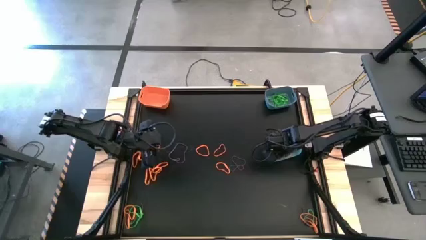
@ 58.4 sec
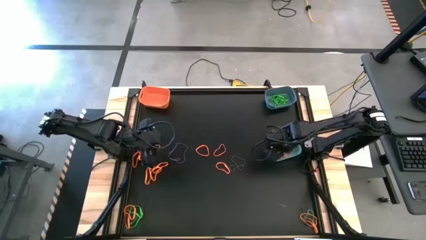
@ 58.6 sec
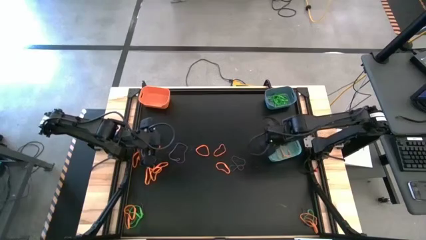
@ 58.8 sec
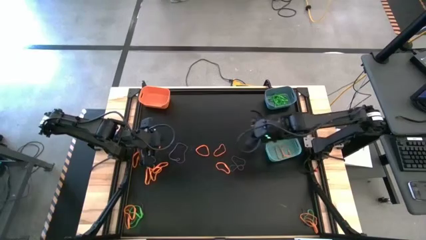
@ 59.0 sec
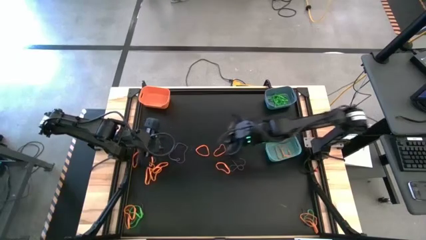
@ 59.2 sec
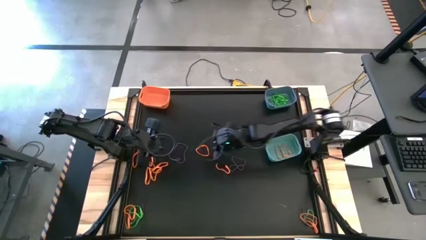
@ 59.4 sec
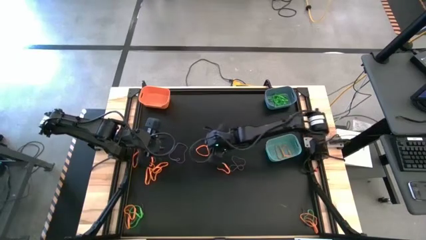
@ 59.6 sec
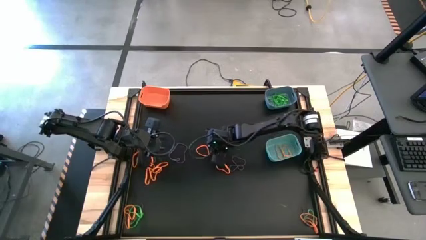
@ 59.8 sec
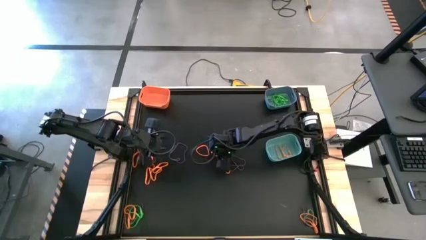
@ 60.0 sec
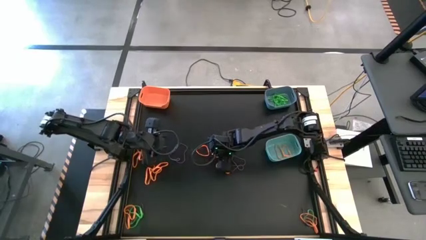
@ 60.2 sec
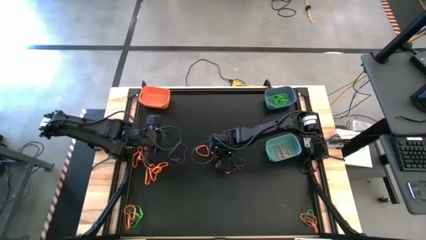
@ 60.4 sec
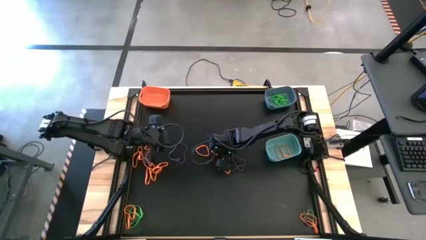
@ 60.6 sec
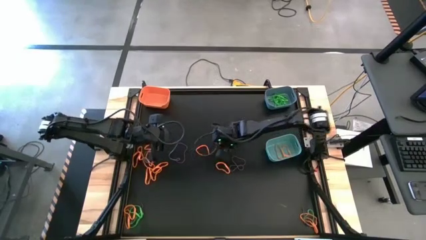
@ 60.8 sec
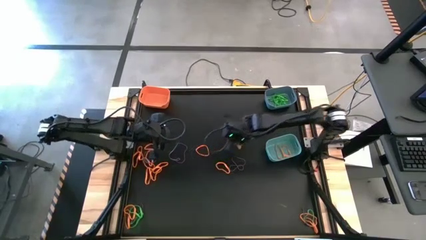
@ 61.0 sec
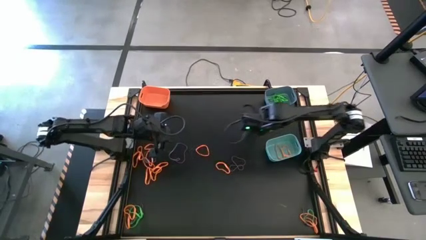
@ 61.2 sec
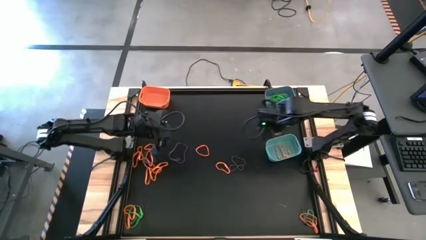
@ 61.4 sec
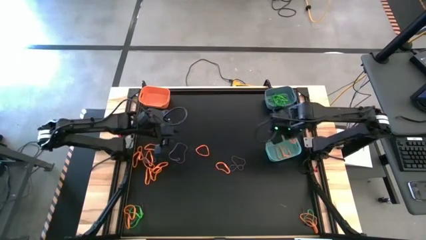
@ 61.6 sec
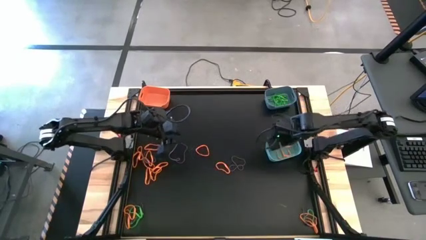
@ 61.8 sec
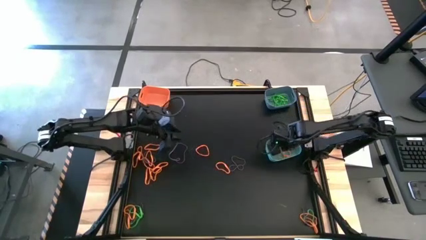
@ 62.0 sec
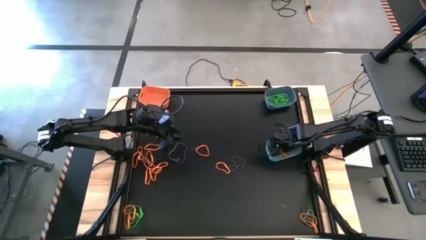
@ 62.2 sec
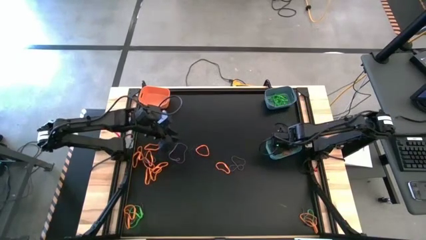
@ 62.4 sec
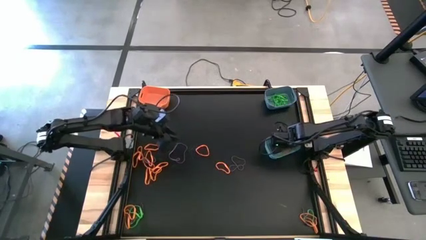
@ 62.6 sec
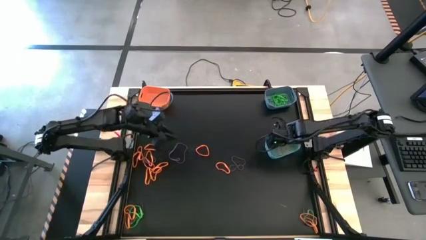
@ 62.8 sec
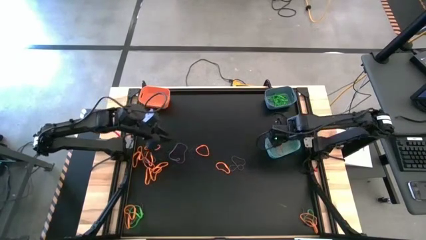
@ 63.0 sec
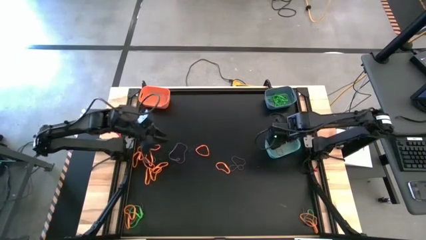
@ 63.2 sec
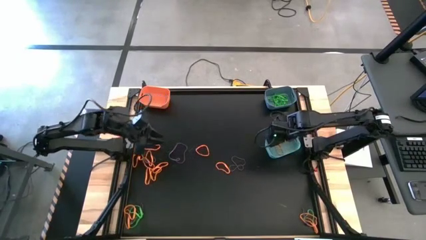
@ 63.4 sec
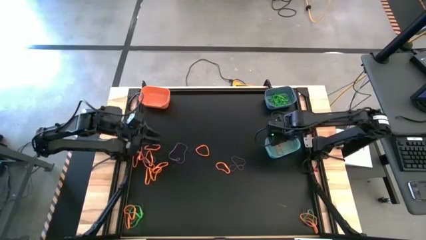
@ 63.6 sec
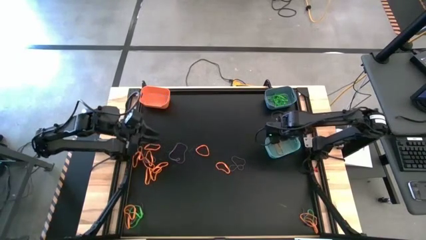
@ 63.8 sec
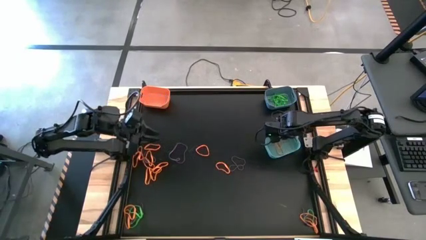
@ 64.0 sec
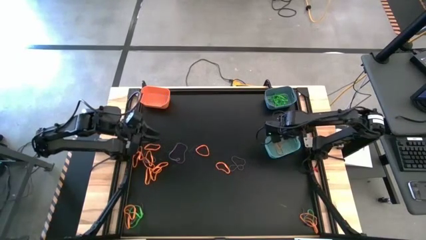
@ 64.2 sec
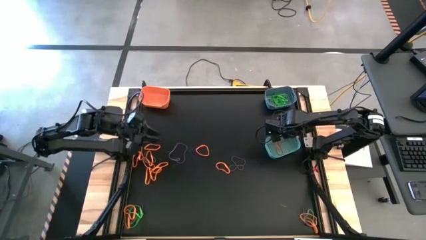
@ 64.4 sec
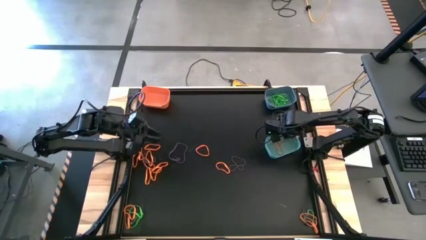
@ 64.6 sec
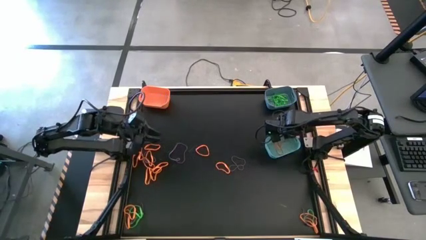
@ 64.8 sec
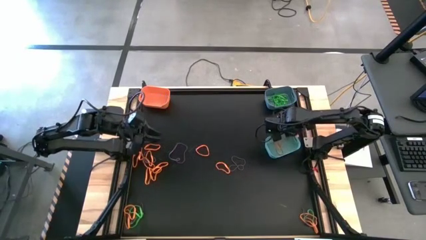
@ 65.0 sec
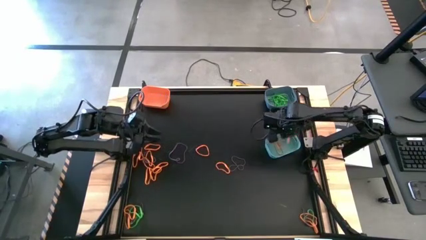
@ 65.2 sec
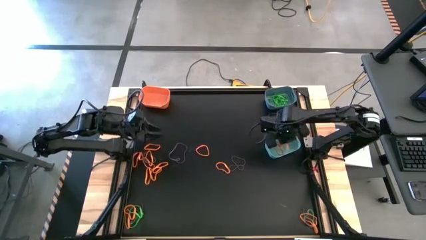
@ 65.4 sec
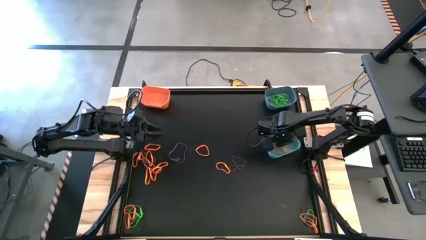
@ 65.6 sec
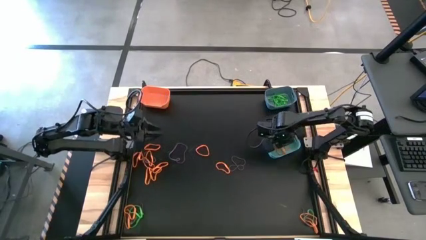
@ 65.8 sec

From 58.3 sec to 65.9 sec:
Task: Sort rubber bands into baskets
Put the orange rubber band into the green bin

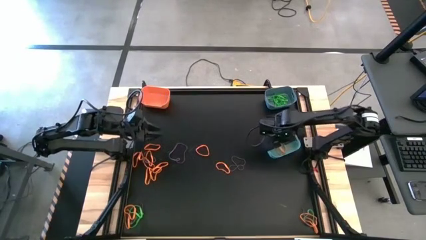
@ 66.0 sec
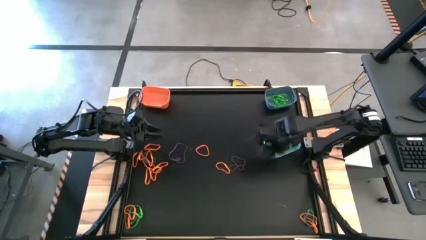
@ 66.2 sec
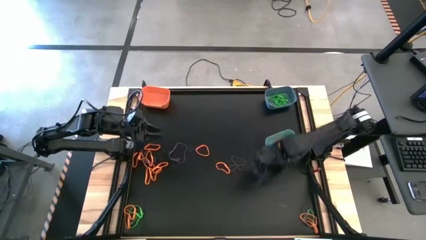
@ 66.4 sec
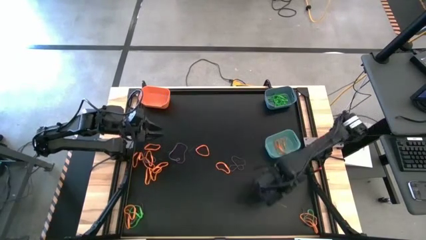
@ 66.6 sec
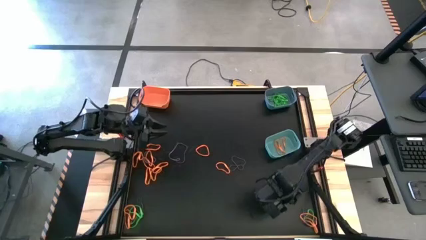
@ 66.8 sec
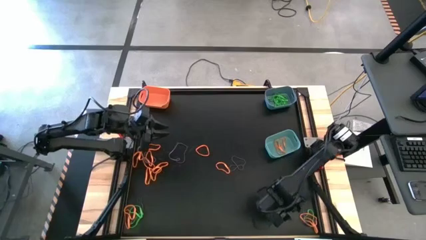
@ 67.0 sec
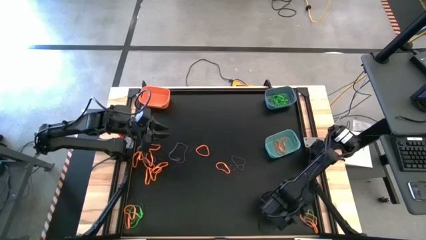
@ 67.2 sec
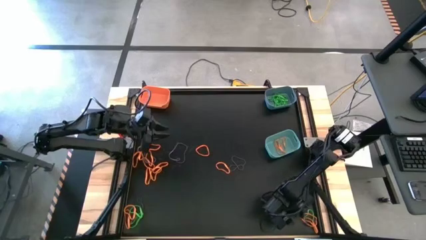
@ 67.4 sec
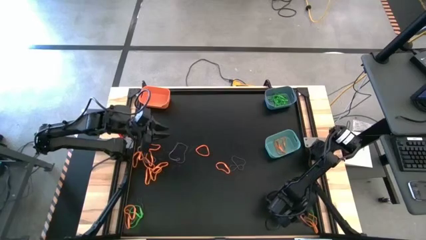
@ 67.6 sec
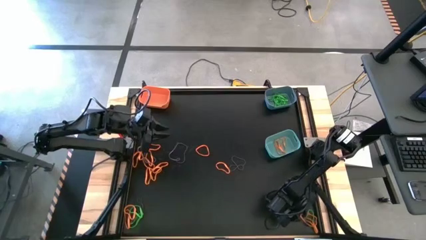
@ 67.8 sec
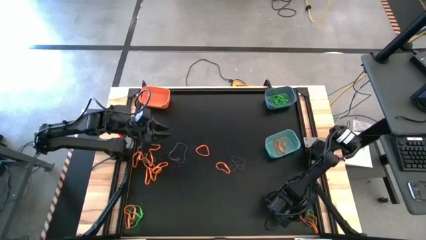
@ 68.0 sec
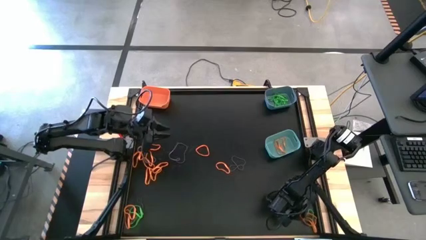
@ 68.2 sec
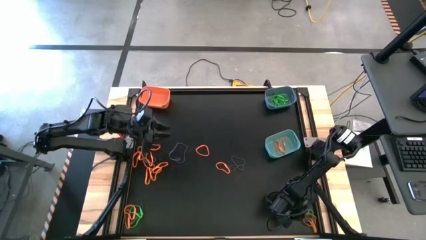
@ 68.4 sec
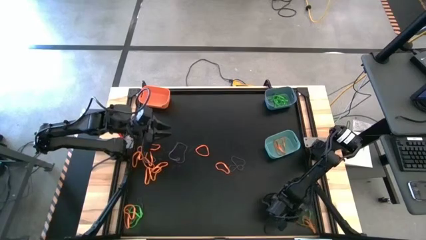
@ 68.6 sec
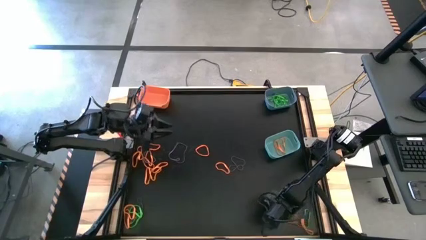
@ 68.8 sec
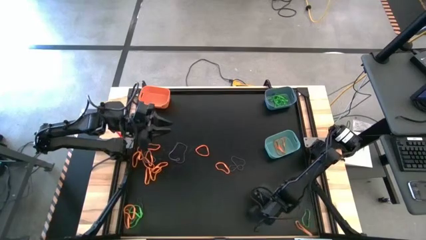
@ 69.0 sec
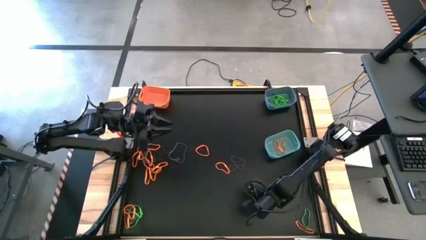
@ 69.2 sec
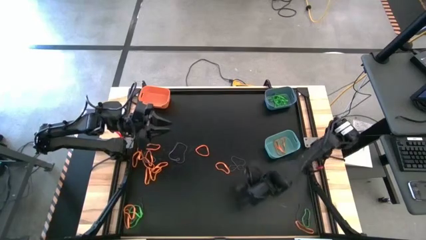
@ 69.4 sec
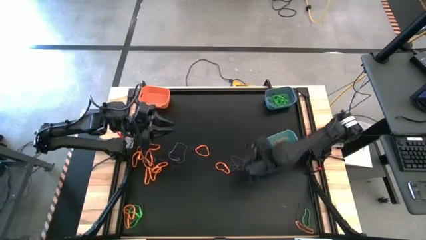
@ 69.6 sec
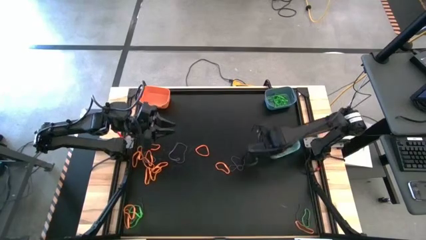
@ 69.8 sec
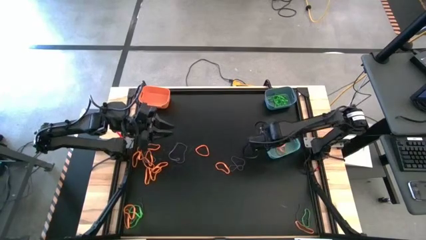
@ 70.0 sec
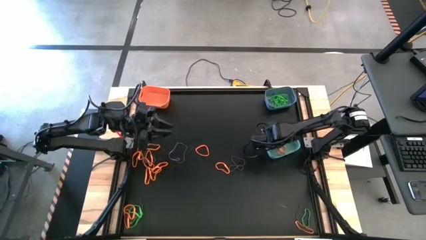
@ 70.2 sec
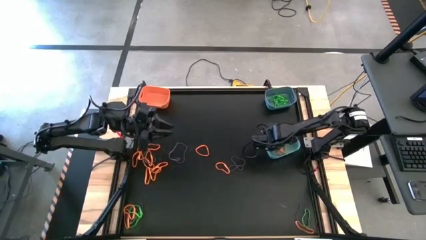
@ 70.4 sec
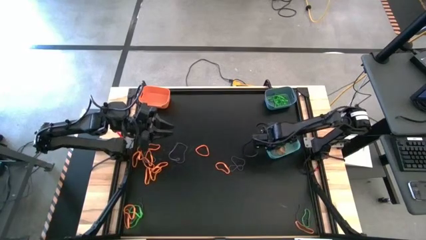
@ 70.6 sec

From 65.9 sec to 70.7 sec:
Put the orange rubber band into the green bin

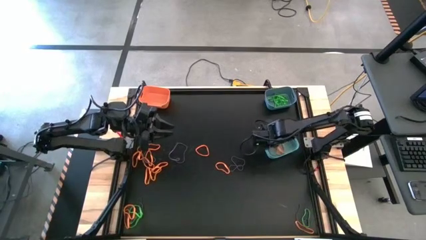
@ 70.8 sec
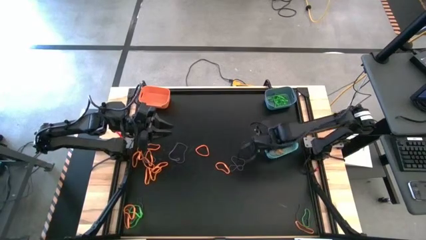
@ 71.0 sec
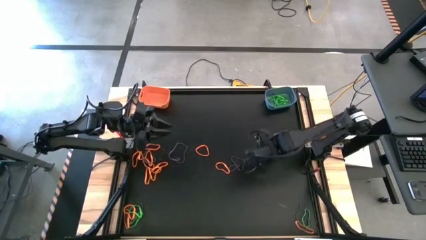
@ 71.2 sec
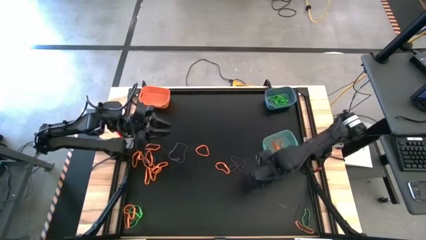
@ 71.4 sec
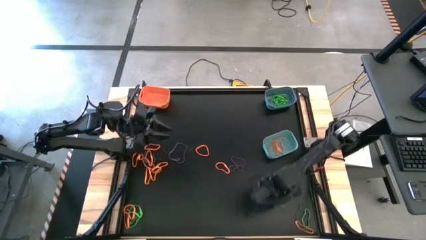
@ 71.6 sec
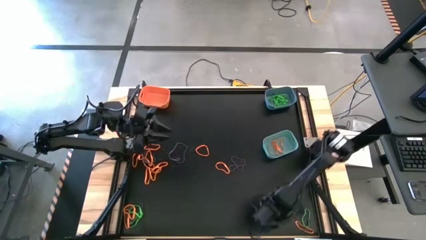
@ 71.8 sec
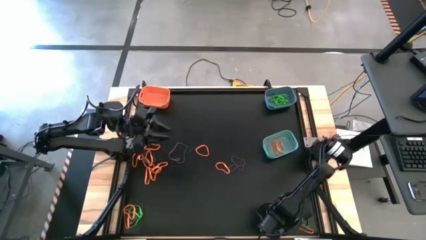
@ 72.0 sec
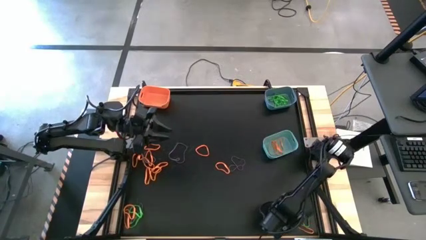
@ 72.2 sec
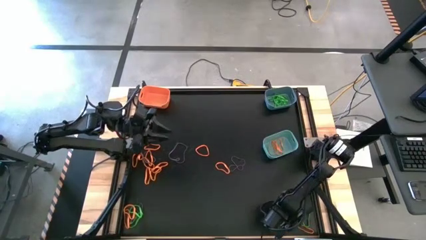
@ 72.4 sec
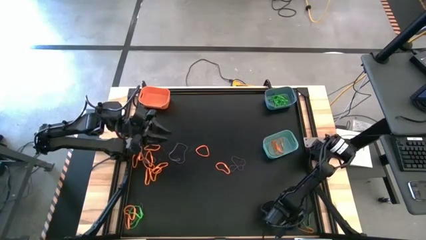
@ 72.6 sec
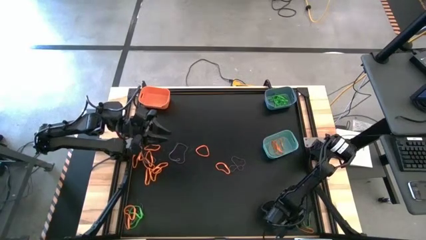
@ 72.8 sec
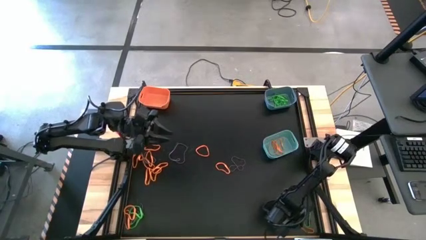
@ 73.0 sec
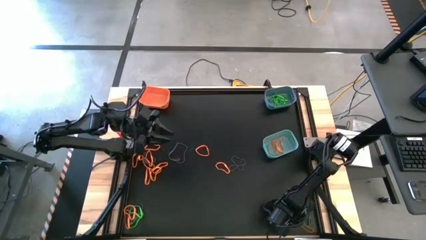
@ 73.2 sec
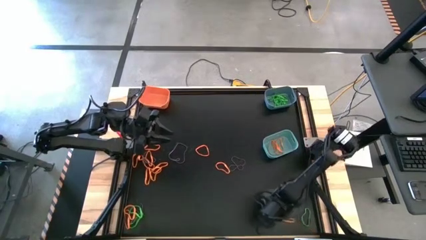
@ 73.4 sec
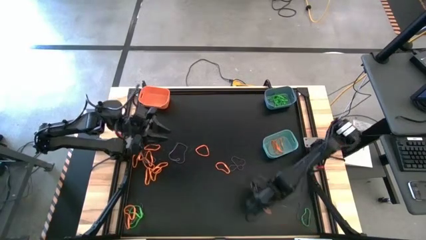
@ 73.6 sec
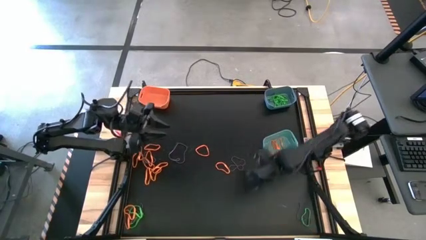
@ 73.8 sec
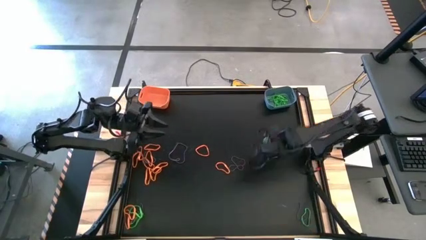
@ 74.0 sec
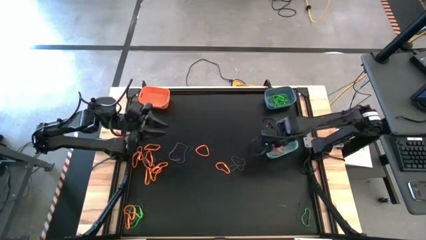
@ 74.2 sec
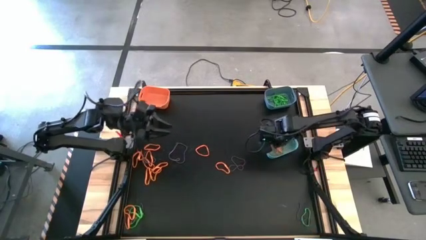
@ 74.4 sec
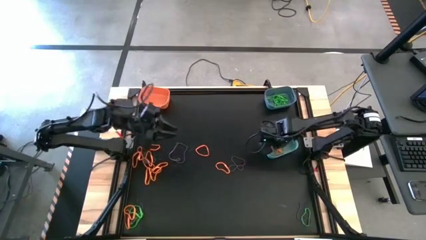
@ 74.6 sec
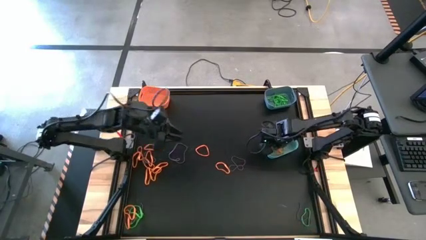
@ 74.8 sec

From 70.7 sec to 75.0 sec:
Put the orange rubber band into the green bin
